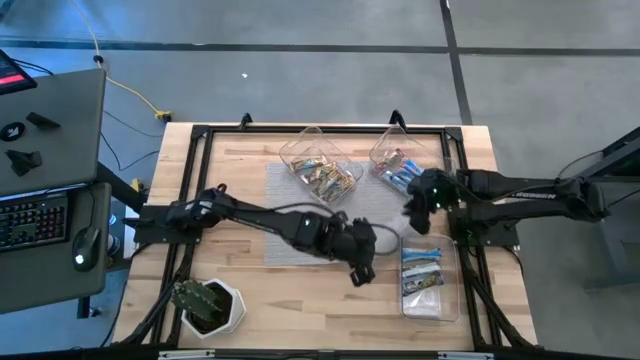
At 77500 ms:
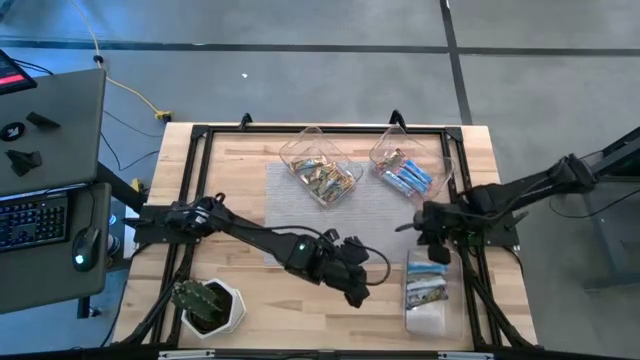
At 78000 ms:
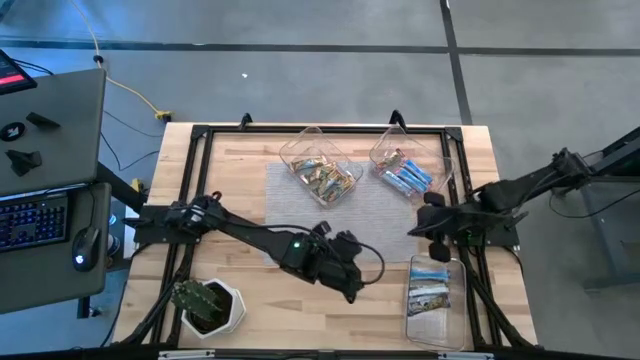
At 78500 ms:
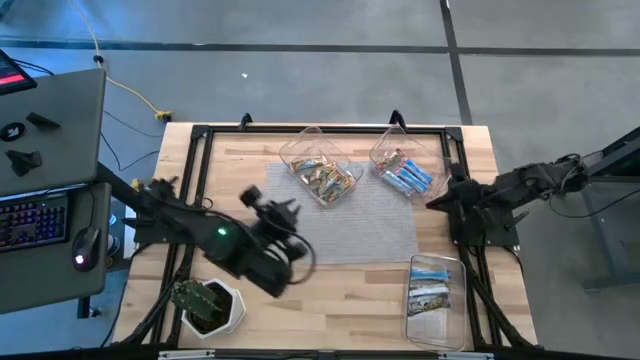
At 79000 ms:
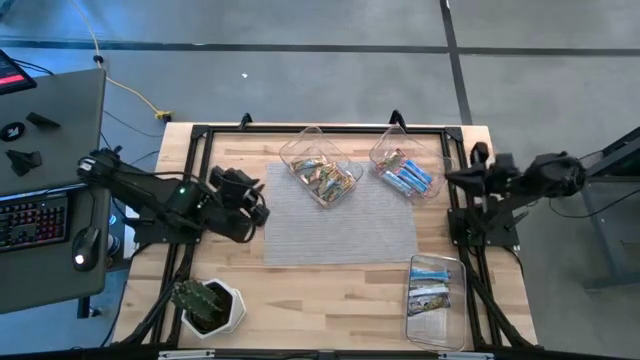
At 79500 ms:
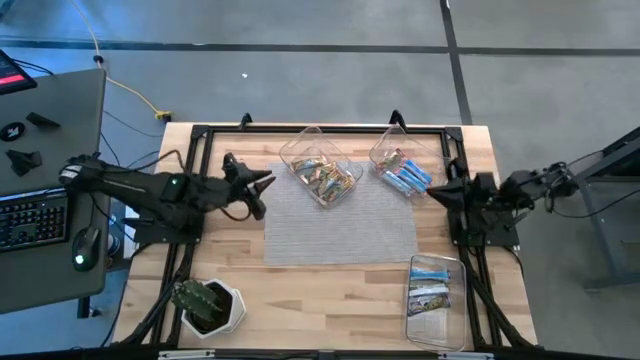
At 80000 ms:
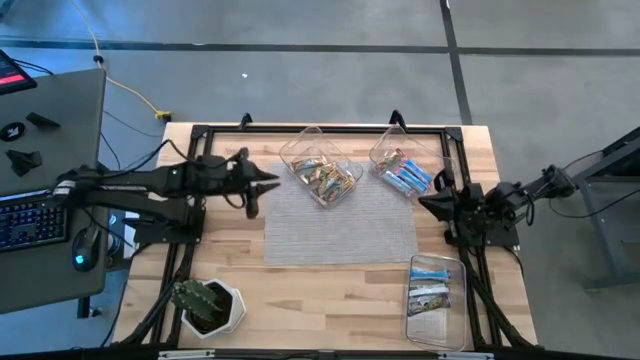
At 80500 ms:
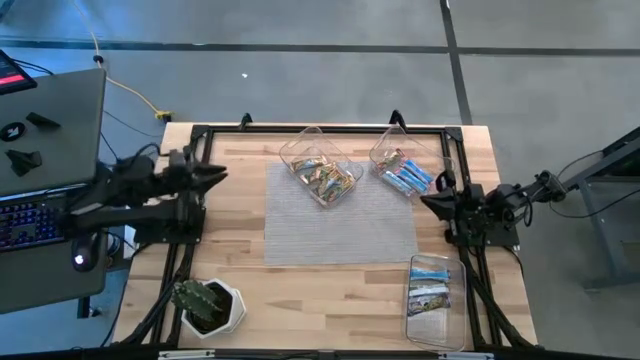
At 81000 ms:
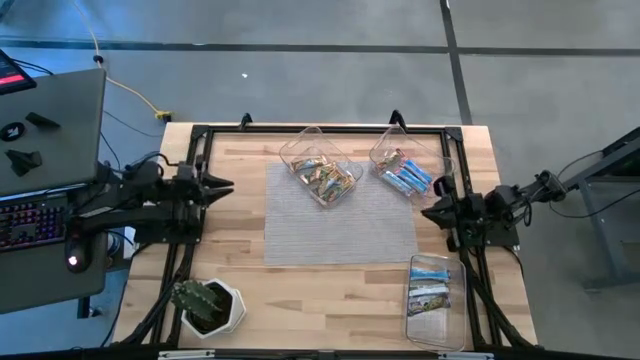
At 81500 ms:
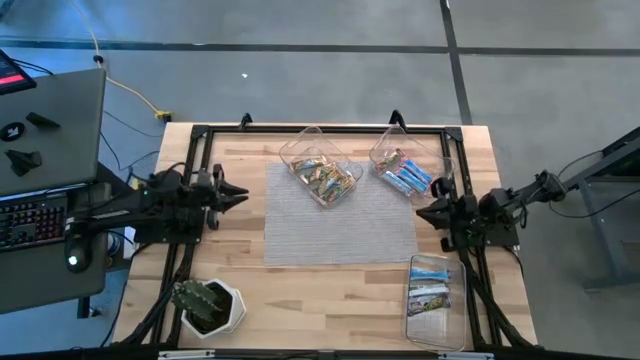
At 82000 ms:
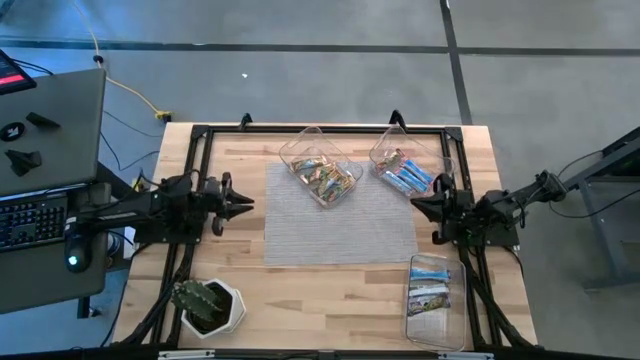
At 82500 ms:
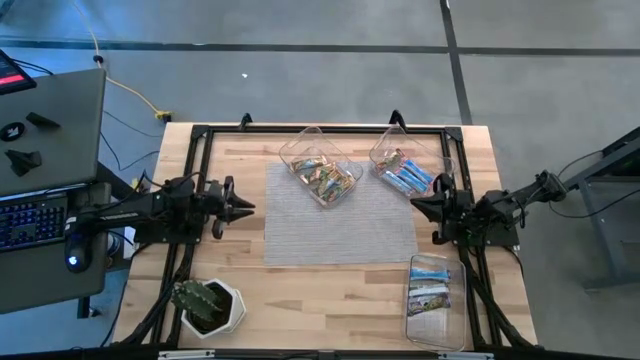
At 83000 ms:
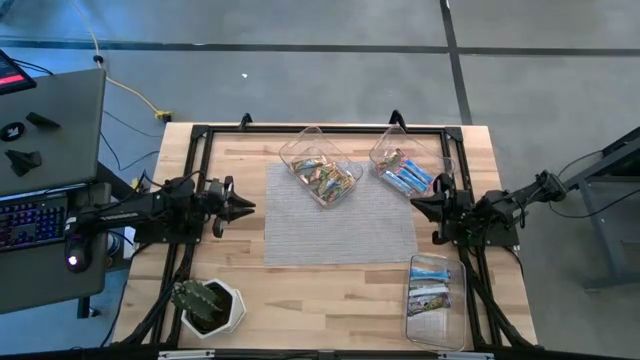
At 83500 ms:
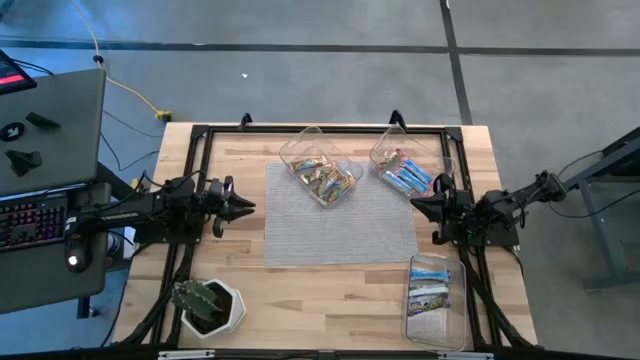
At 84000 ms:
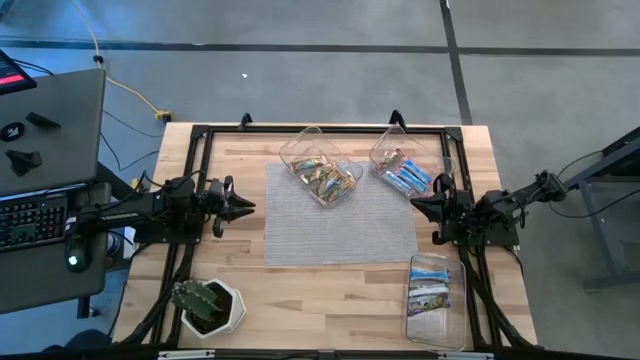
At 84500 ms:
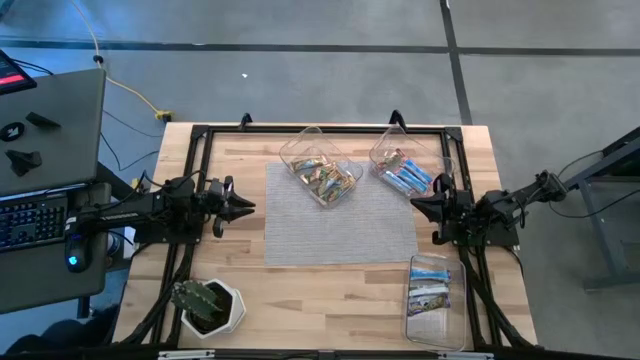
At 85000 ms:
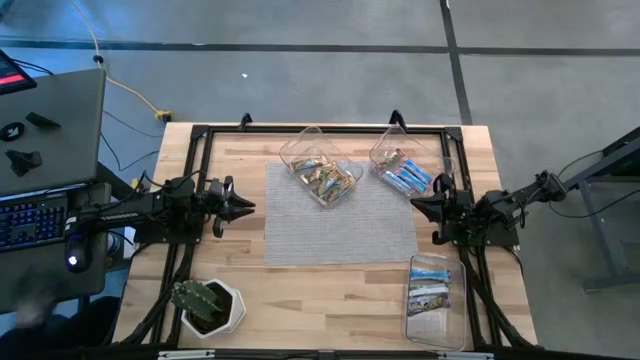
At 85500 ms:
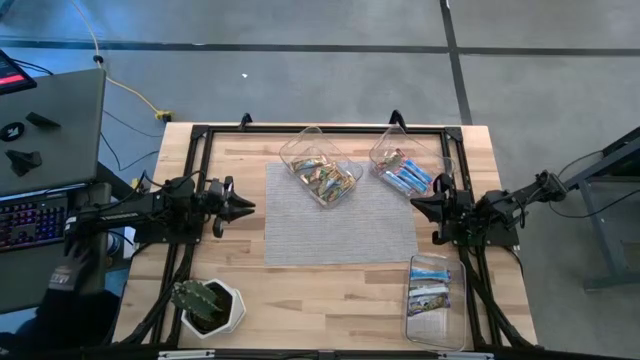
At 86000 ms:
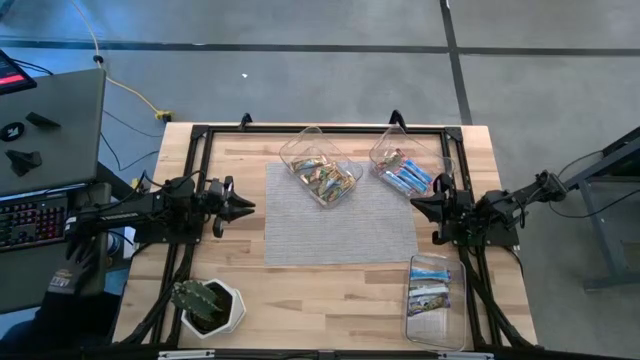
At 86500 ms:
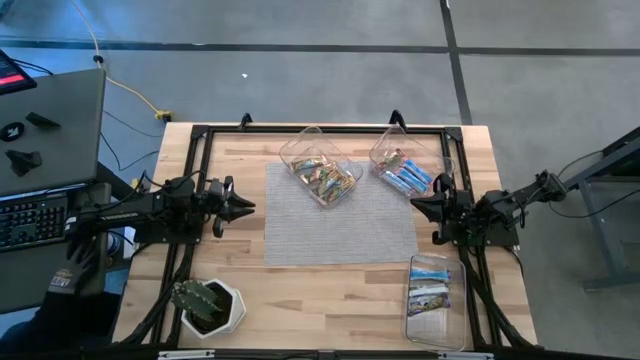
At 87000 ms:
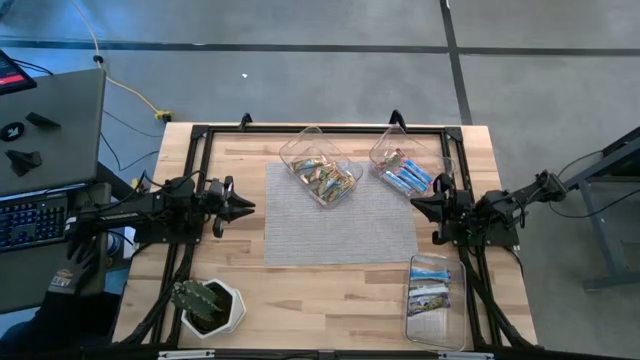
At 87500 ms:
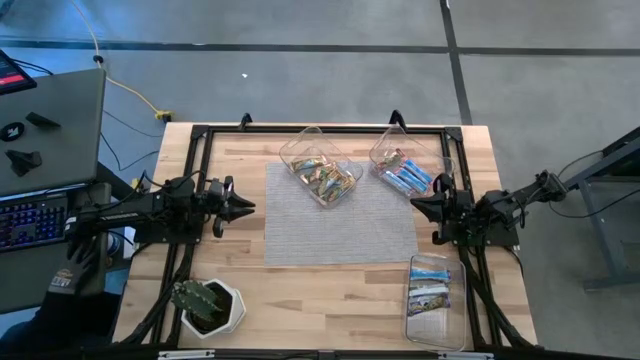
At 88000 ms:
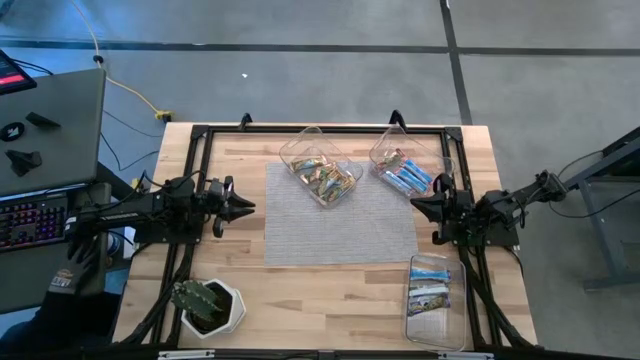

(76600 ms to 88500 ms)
Task: Pick and place Granola Bars by type
Return to Home Position

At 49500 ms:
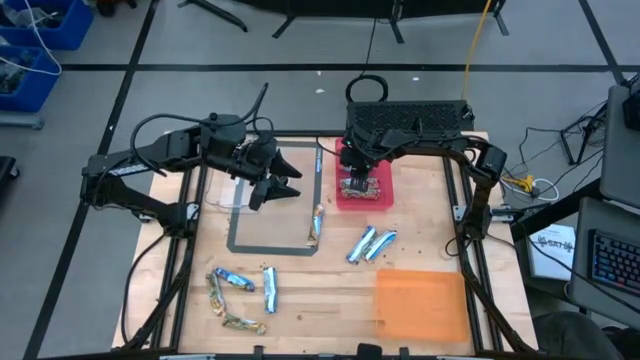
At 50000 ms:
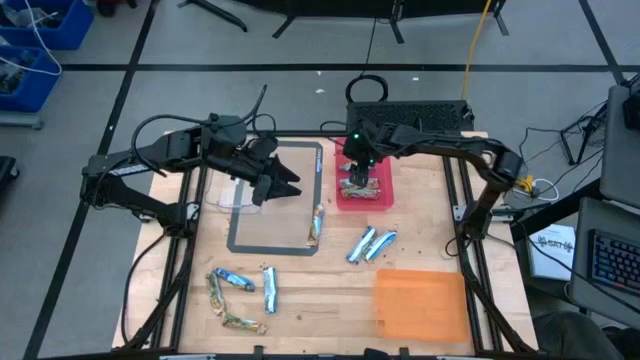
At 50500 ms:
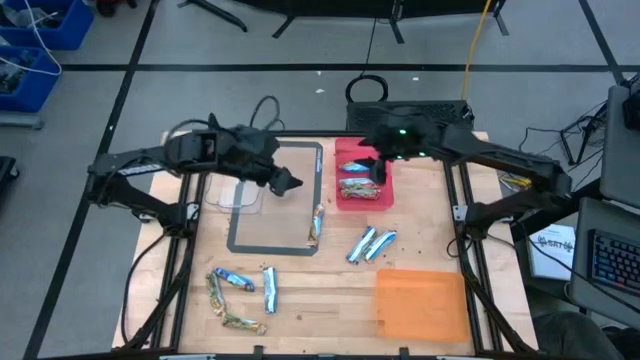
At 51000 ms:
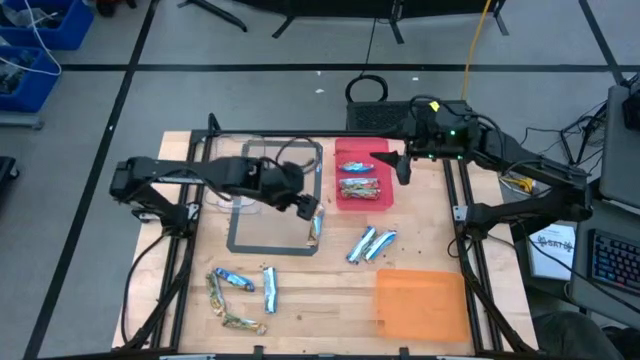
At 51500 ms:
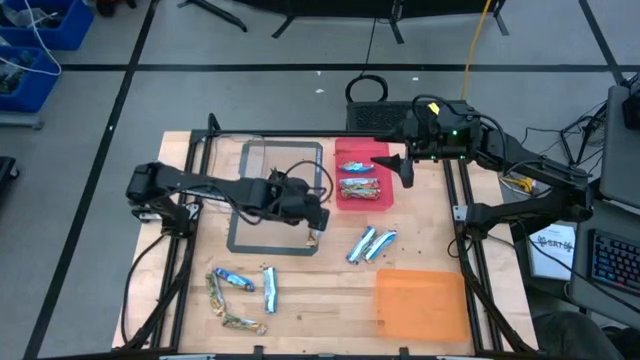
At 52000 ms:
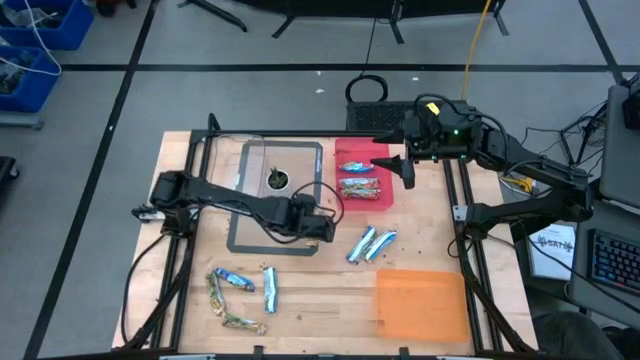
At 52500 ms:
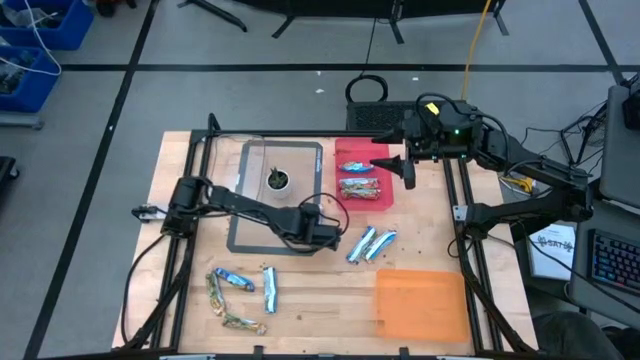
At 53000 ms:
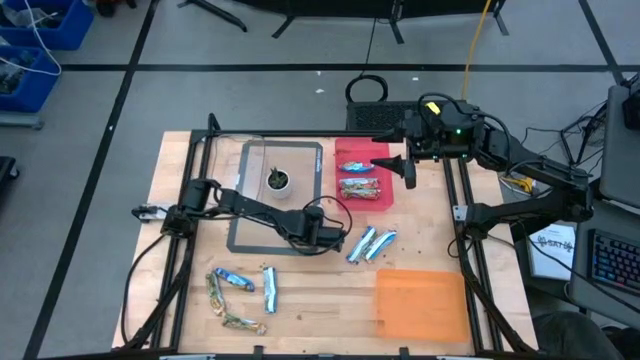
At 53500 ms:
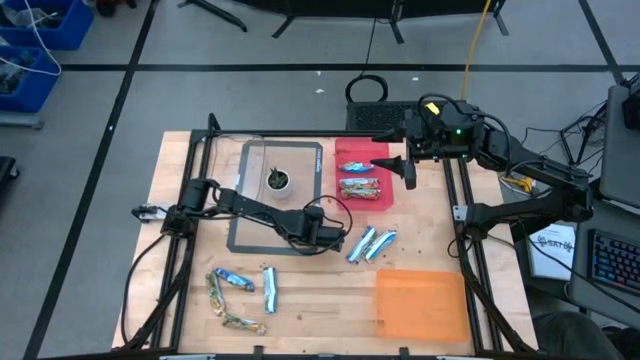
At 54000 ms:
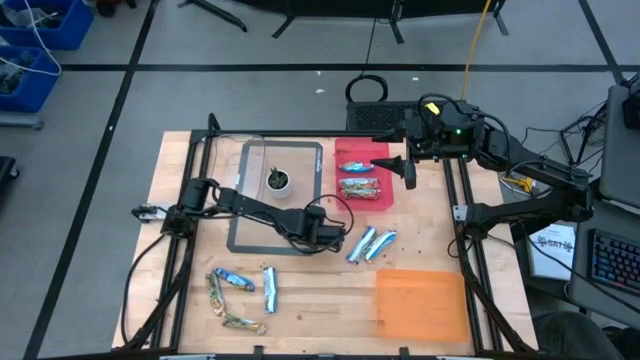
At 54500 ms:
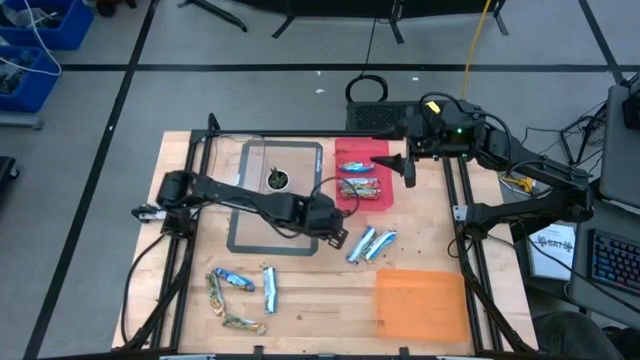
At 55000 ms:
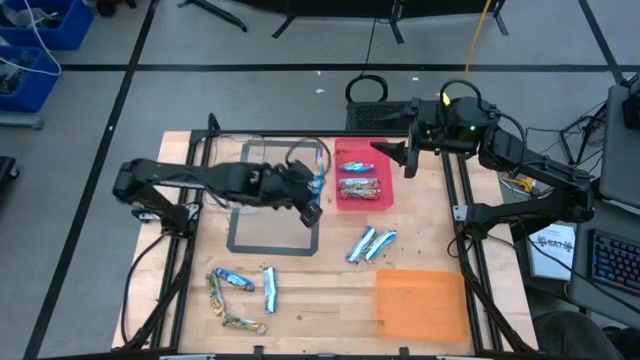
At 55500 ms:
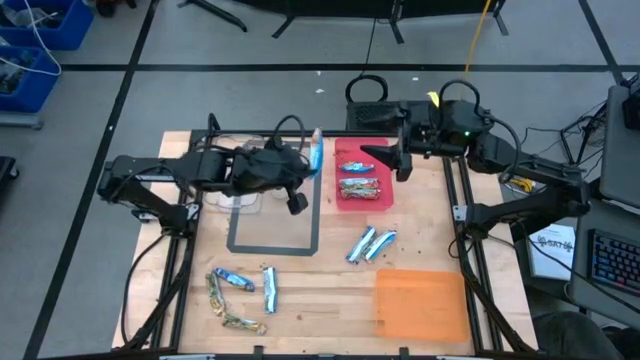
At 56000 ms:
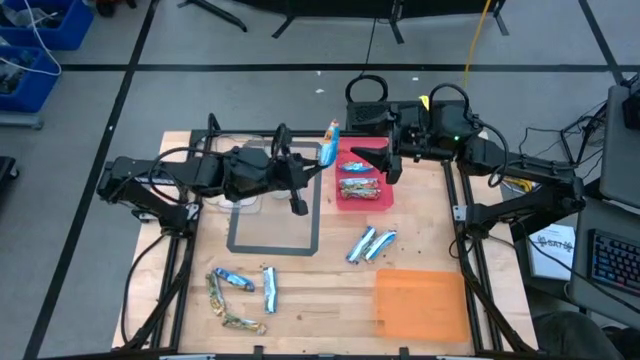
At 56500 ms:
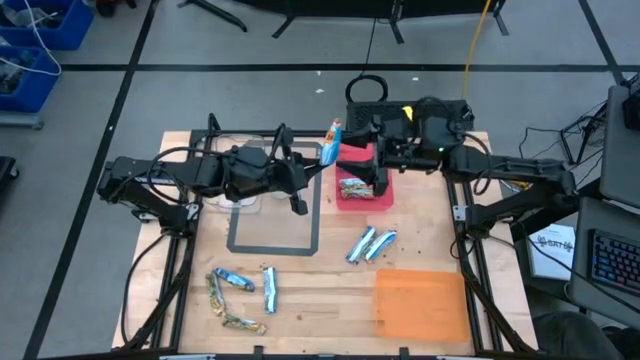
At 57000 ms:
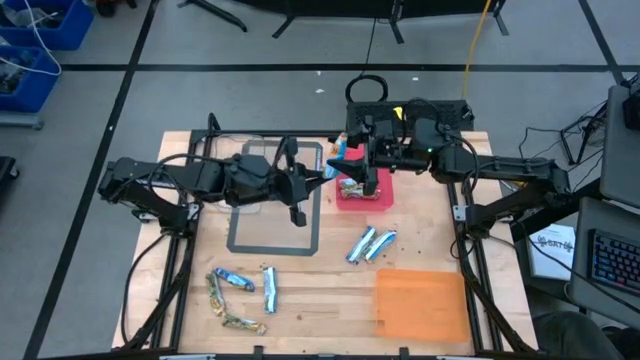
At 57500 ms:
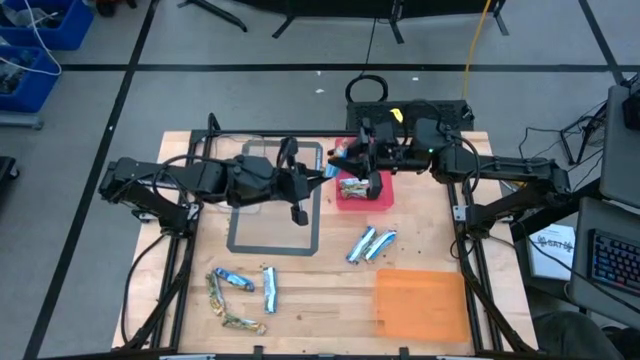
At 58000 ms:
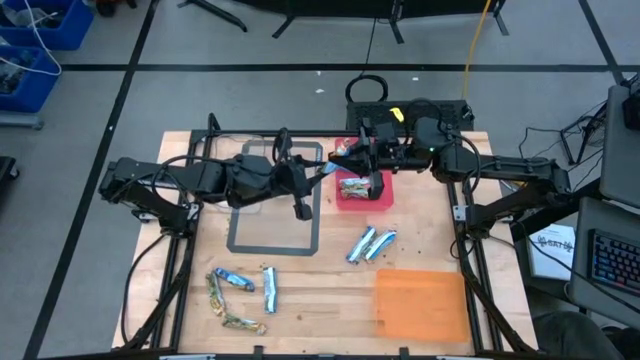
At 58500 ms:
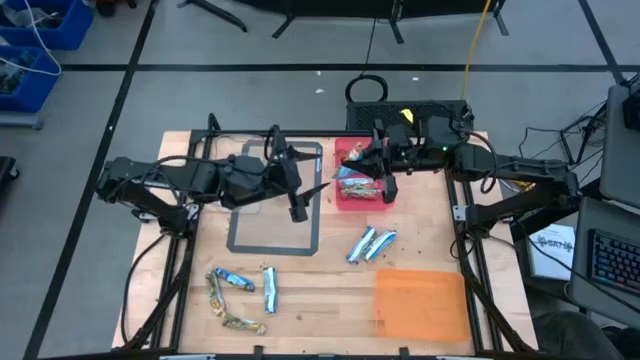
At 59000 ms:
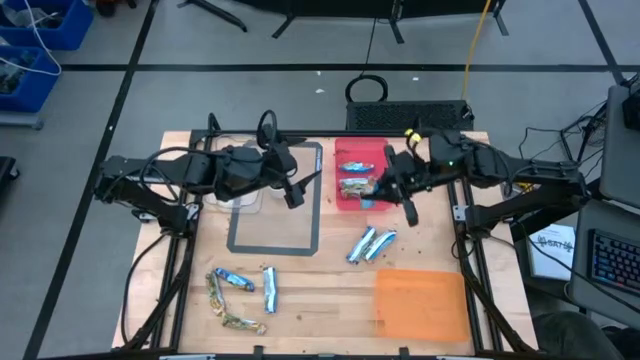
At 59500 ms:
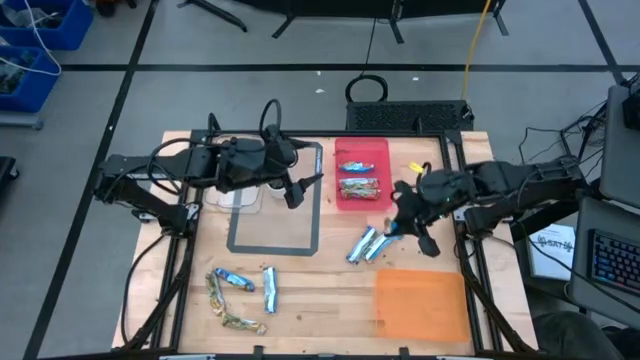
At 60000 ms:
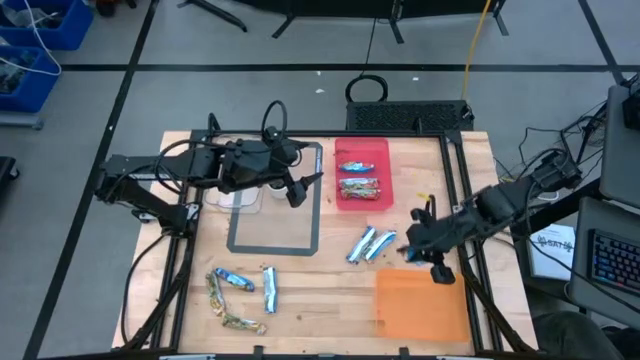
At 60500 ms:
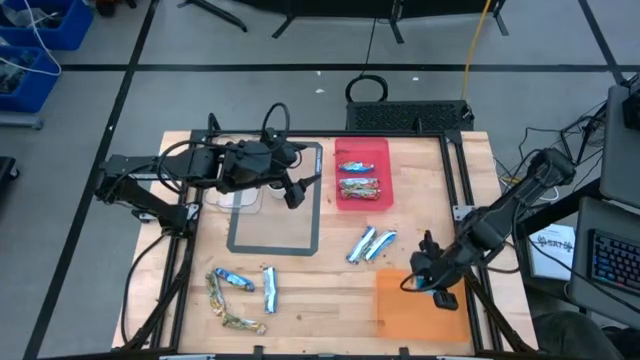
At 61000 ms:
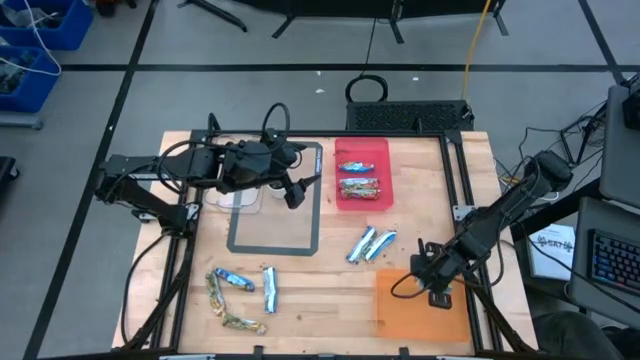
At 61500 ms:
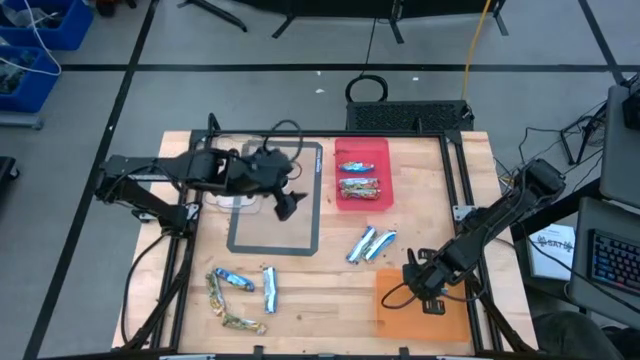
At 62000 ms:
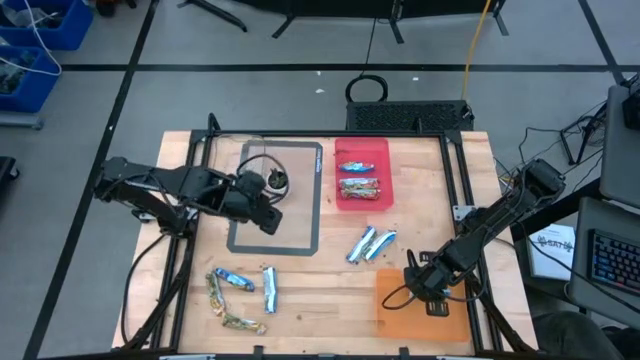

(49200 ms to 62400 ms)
Task: Pick and place Granola Bars by type
Put the orange granola bar into the orange bin
